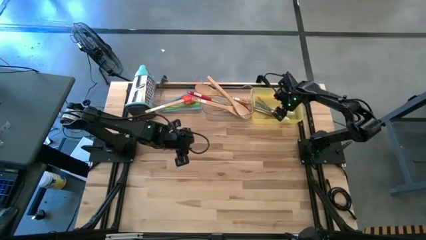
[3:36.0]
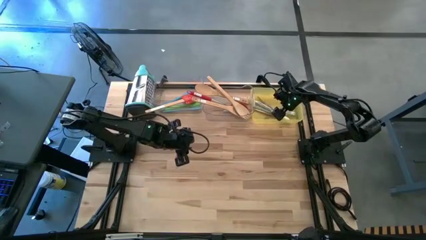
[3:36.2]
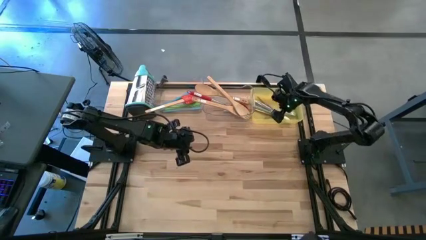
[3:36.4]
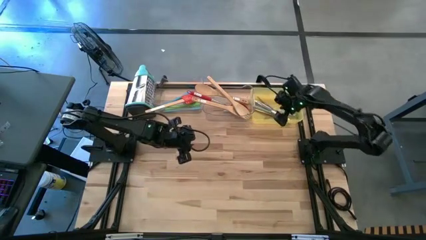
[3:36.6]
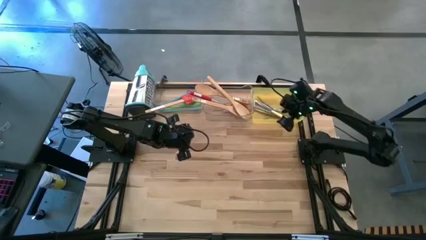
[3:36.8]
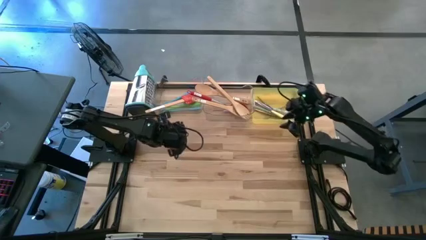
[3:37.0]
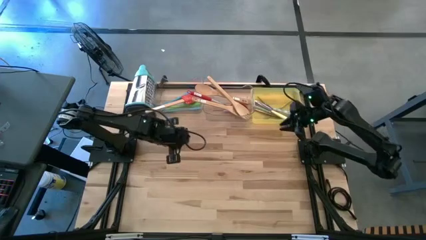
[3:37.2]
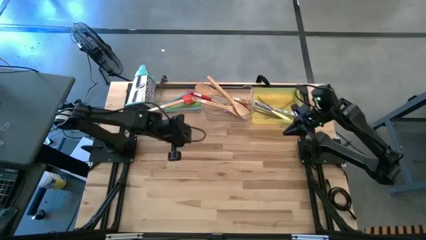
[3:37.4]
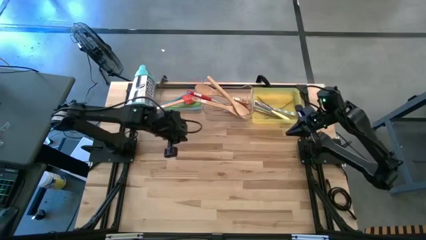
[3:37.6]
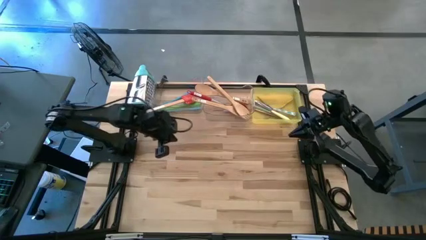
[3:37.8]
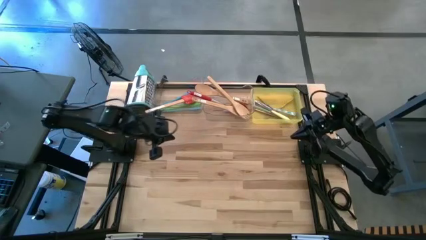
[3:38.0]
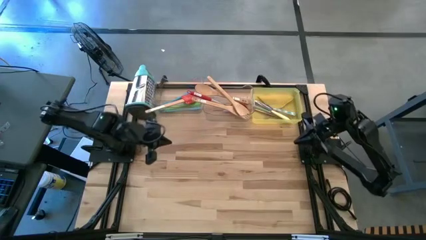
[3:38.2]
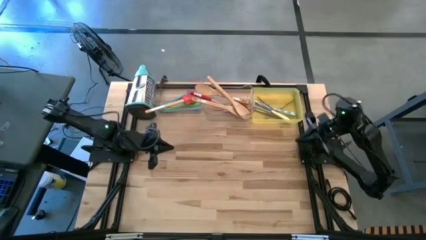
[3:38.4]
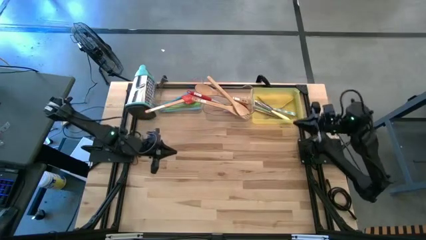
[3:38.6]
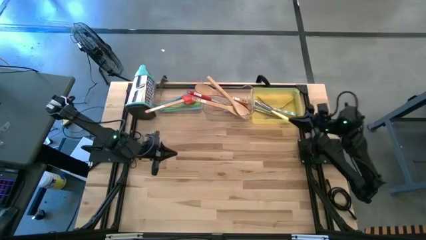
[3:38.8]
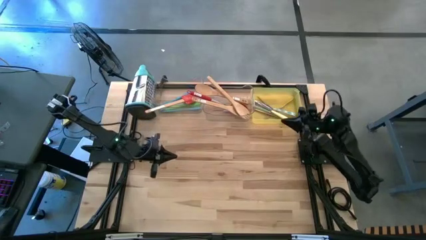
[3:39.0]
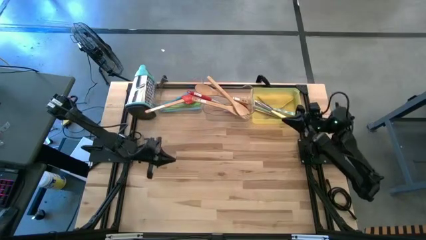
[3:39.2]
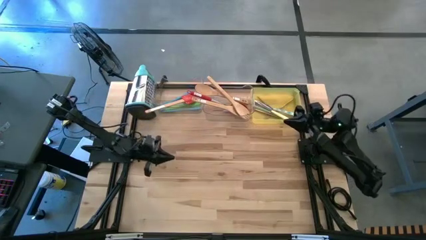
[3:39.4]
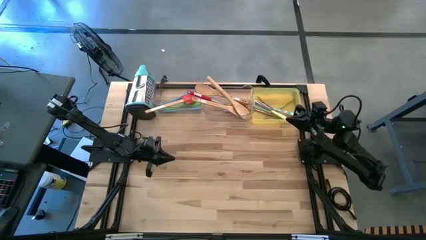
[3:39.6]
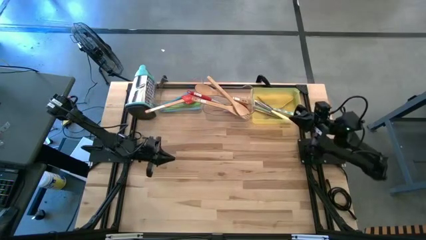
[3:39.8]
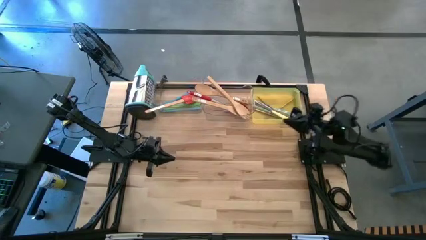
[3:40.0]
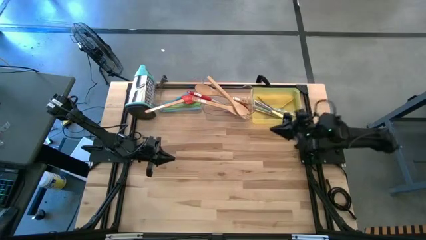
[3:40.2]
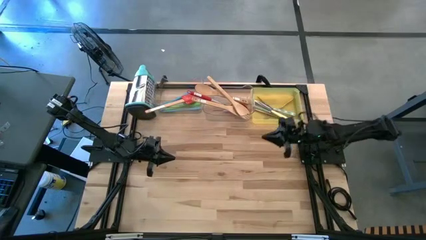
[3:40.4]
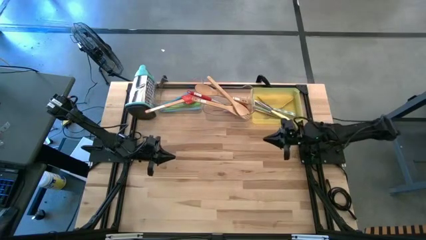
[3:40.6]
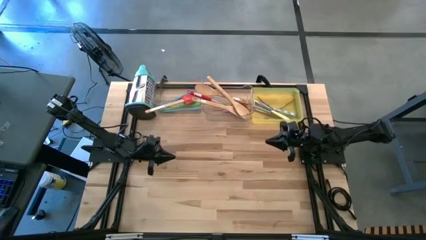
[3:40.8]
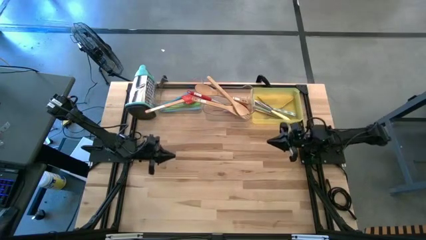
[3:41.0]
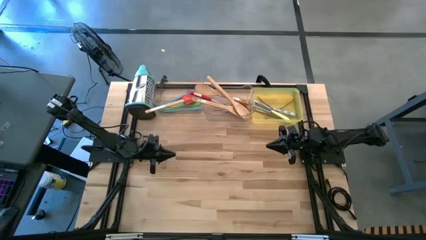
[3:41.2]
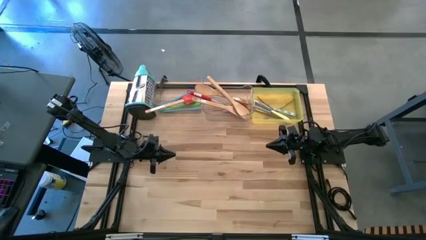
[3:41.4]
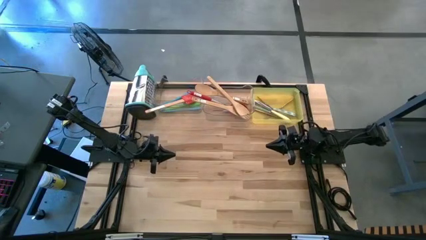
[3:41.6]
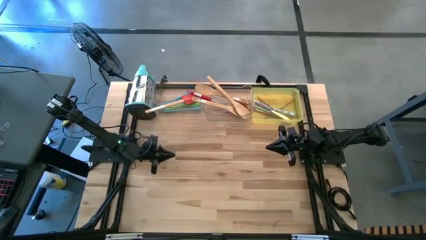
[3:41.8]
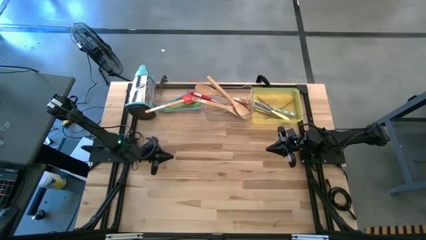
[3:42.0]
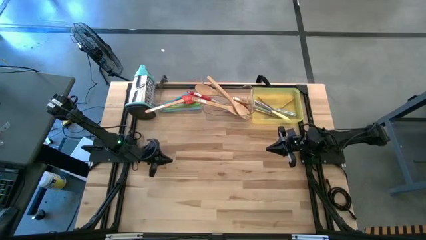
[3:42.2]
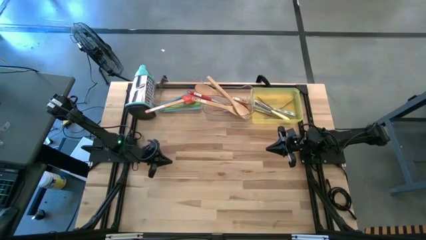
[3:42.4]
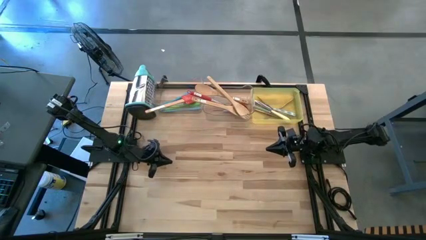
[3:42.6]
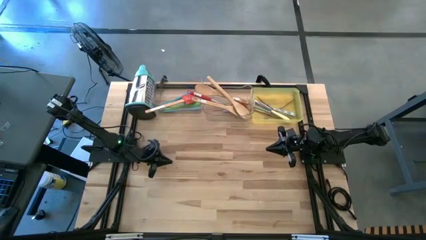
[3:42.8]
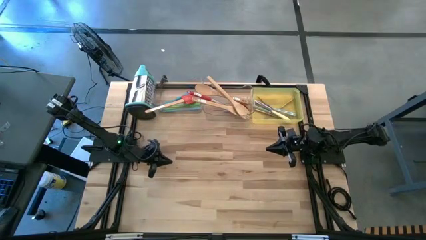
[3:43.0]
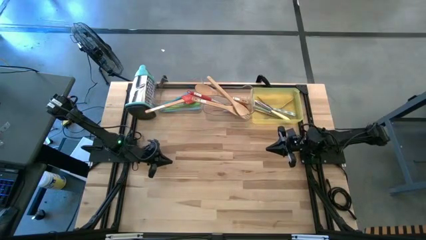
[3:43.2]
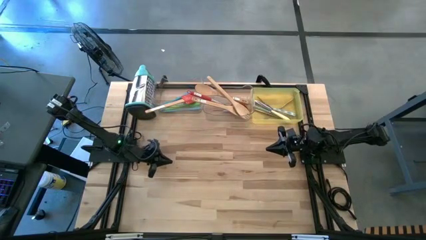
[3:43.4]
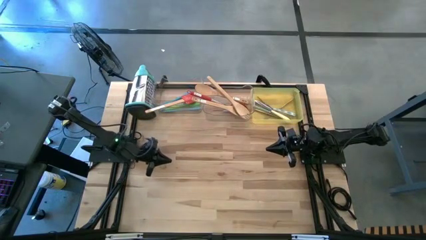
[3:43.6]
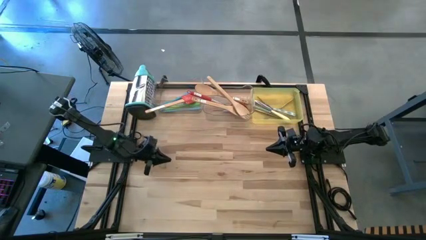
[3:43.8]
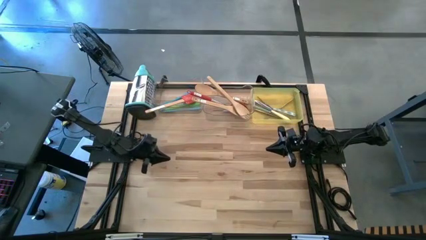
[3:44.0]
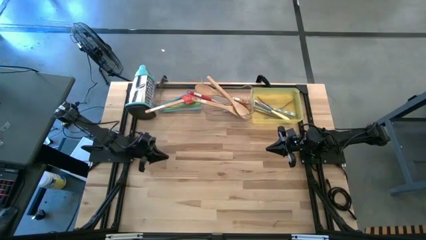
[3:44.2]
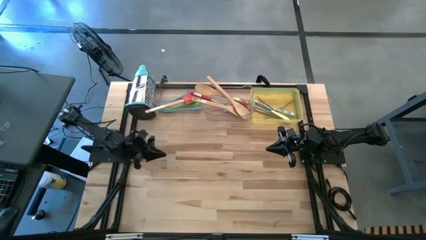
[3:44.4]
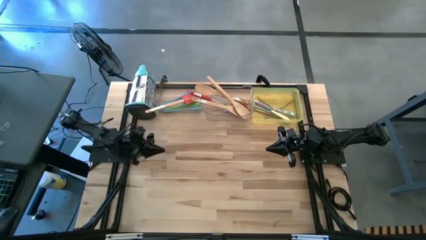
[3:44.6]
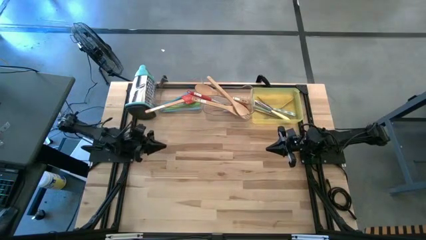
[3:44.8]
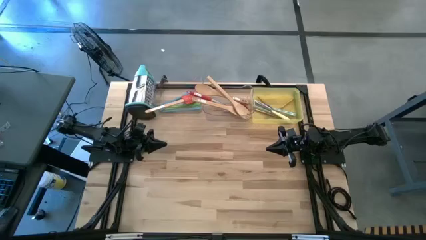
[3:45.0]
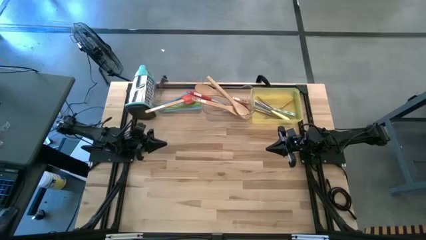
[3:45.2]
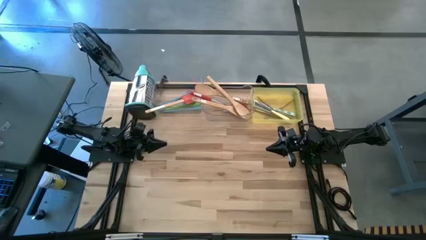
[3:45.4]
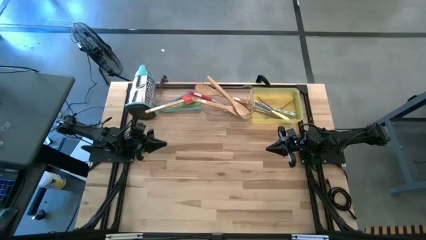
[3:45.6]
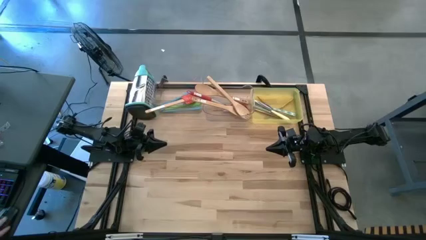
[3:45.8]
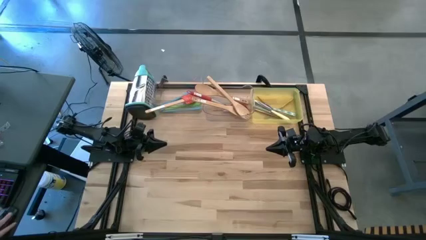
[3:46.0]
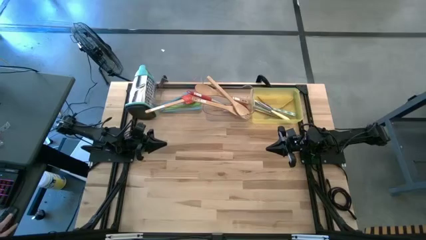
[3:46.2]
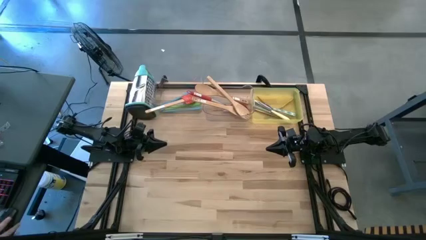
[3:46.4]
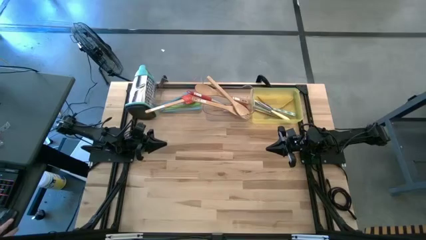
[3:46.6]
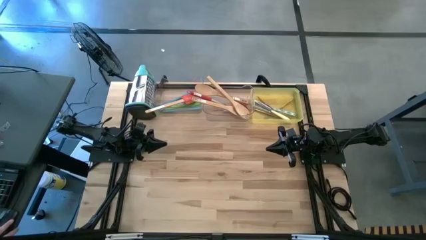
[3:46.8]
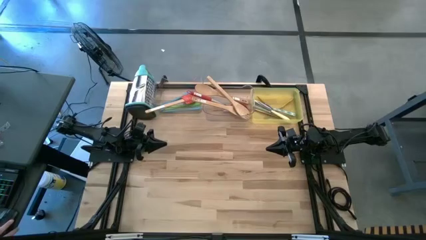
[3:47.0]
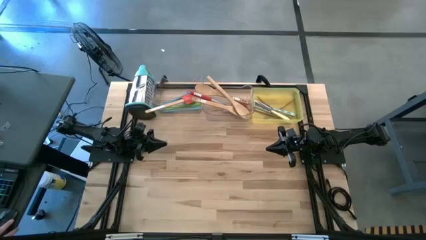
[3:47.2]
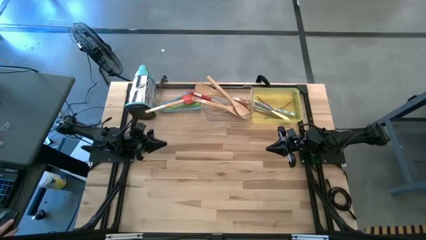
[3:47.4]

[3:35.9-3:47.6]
Task: Pick & Place Kitchen Items
Return to Home Position

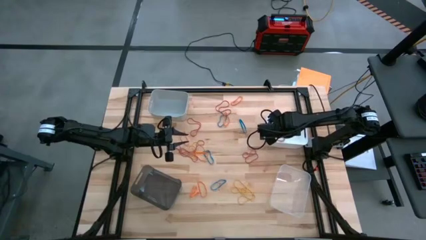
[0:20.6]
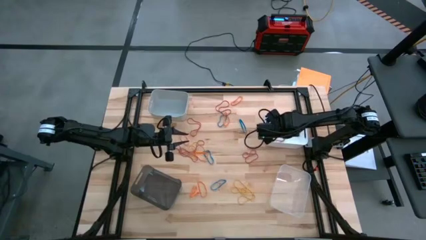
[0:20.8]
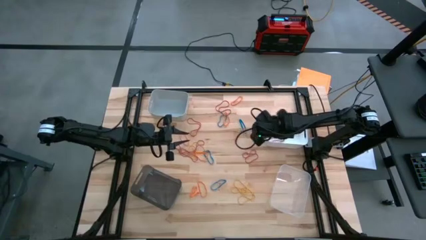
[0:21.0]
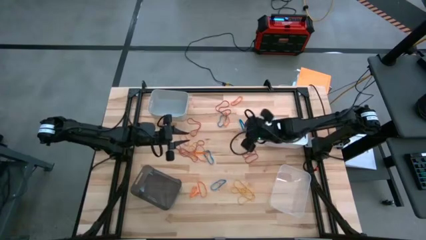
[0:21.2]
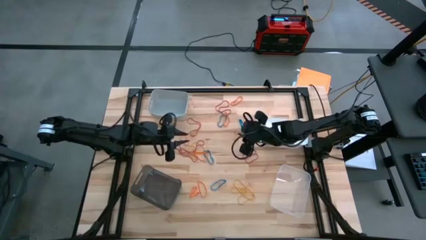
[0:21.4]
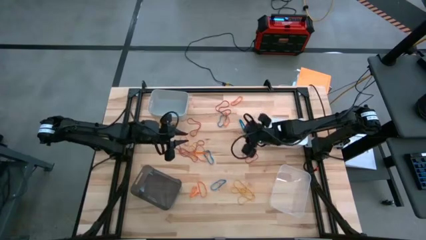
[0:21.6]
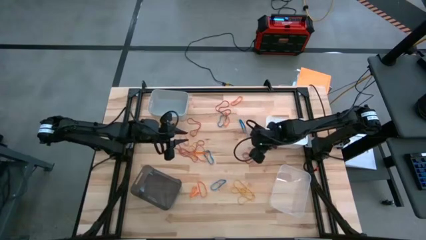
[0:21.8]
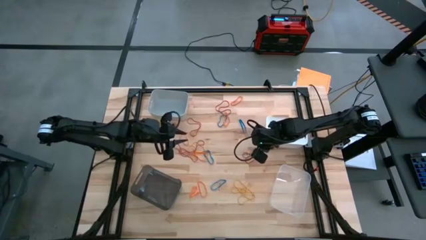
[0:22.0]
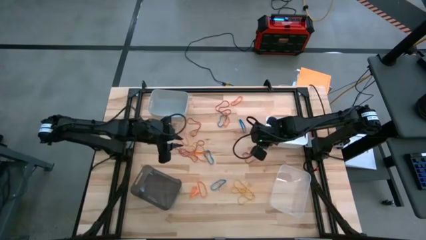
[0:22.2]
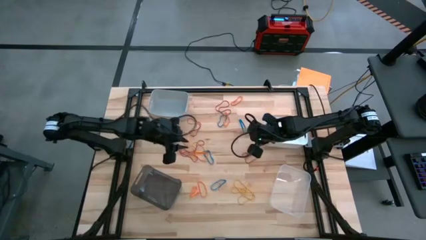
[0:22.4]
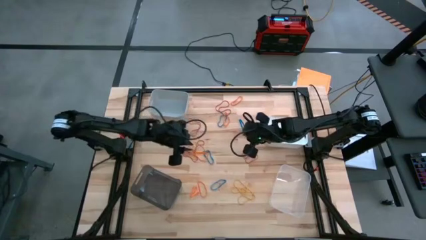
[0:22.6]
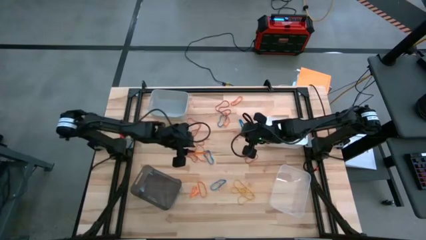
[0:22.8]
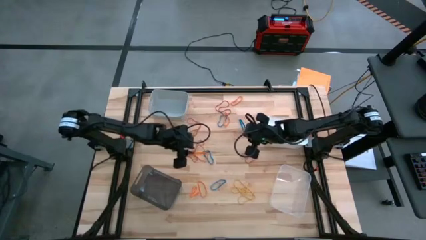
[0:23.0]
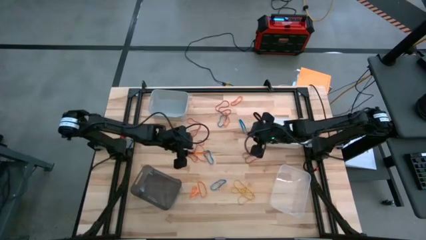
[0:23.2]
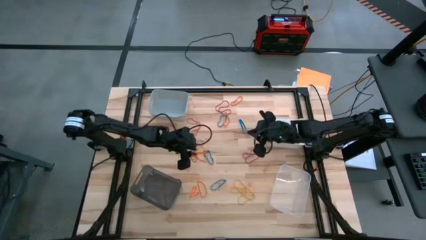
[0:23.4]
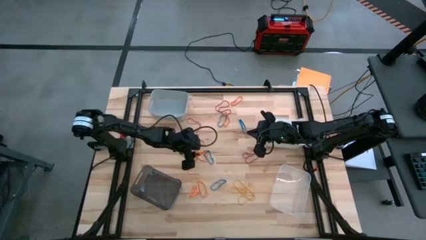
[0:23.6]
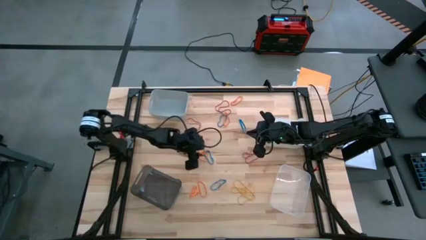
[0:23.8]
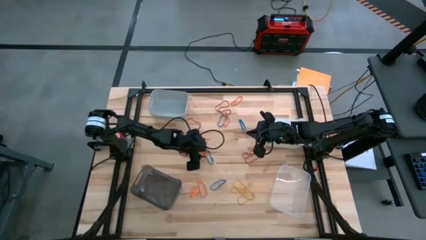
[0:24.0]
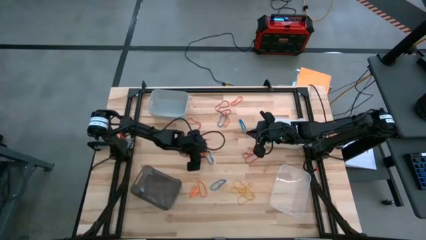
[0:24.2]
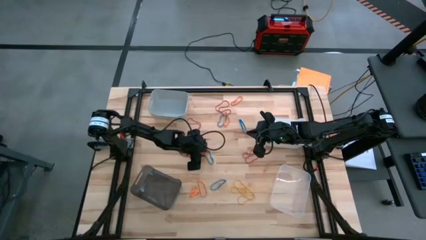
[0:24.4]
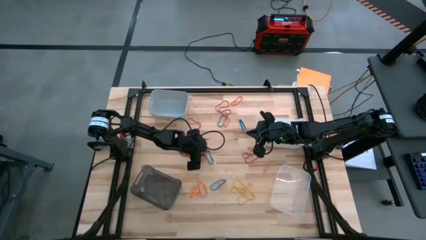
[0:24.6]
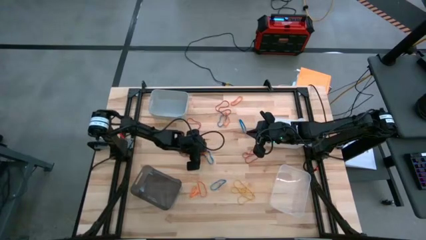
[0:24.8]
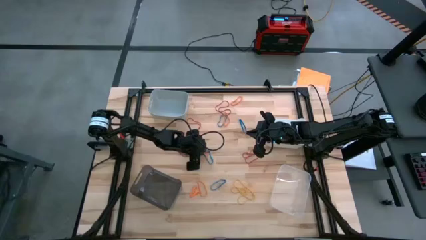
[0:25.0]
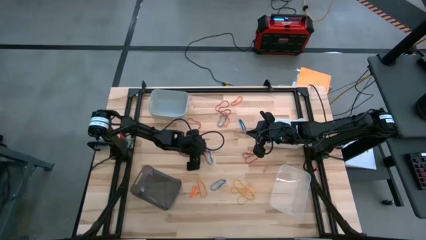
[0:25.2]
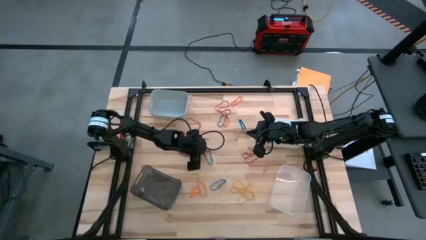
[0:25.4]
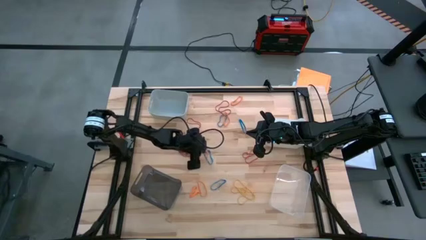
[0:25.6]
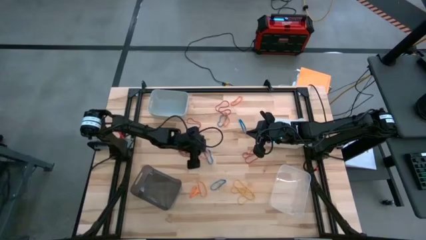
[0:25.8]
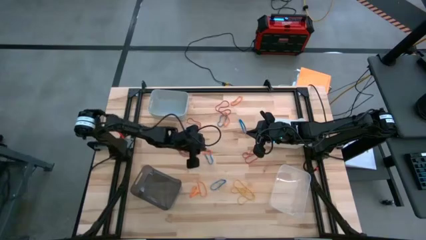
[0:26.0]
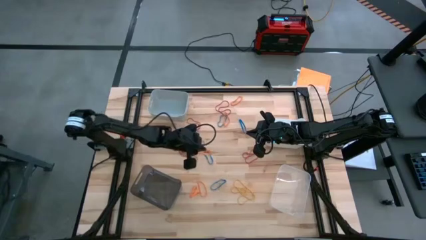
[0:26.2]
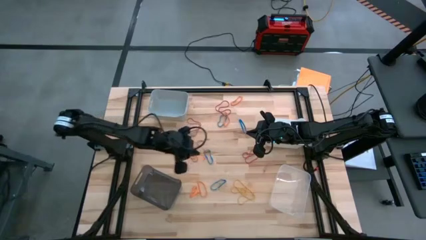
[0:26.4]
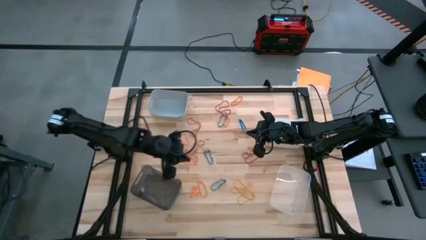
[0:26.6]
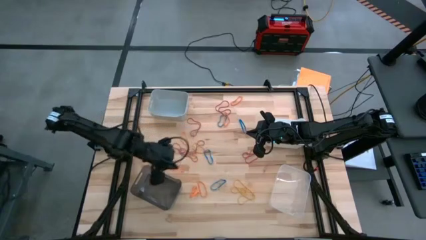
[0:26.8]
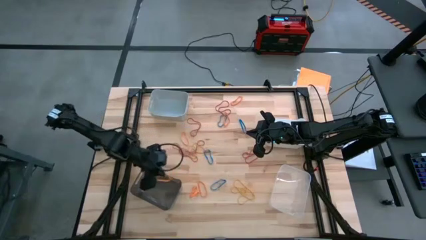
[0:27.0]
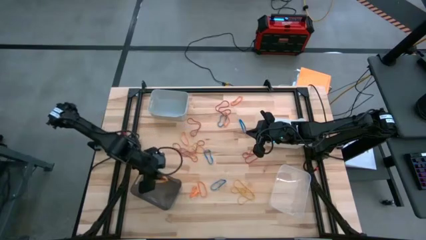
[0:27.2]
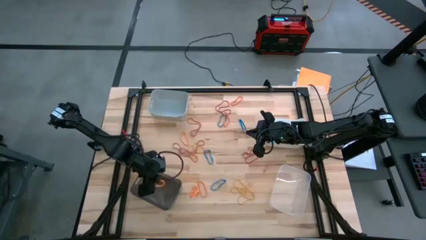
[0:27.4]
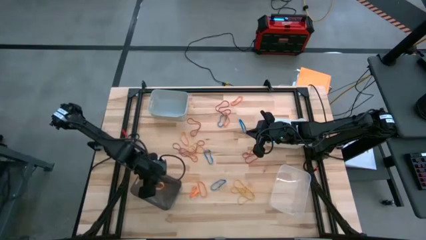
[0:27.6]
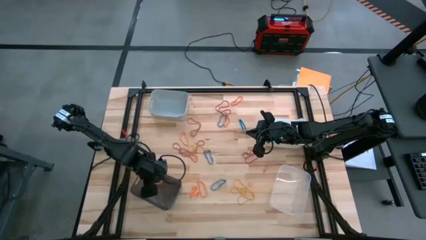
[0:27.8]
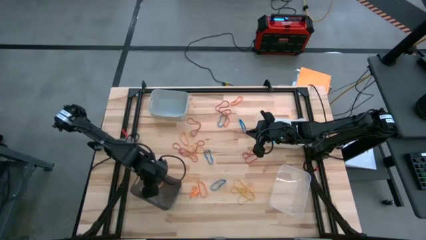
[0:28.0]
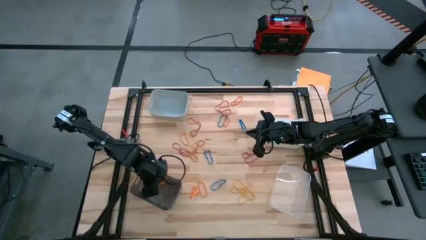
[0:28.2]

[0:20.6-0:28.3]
Task: Sort rubber bands into baskets
Put the orange rubber band into the black bin
